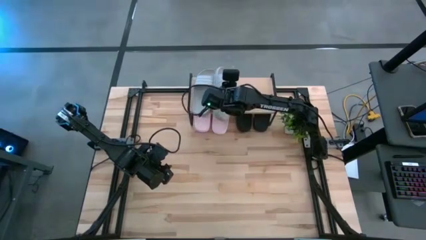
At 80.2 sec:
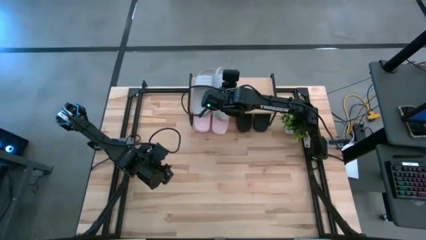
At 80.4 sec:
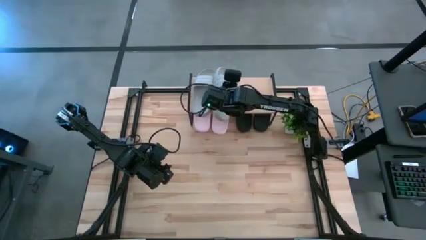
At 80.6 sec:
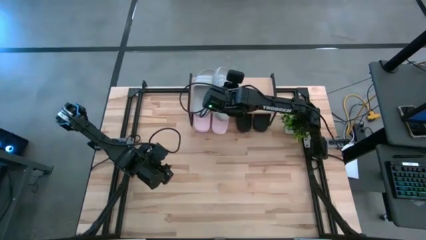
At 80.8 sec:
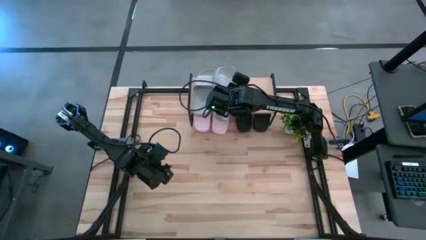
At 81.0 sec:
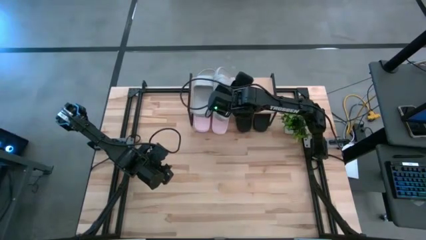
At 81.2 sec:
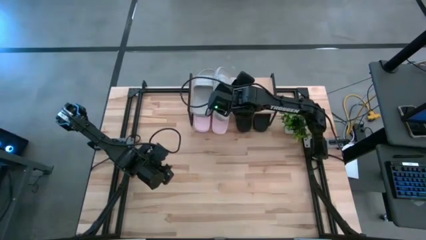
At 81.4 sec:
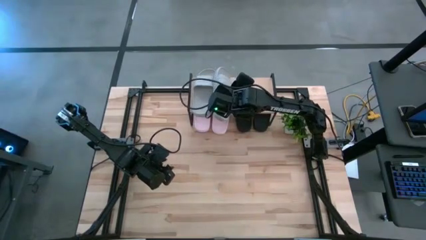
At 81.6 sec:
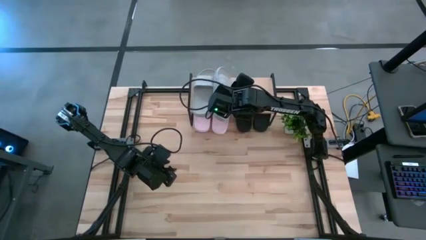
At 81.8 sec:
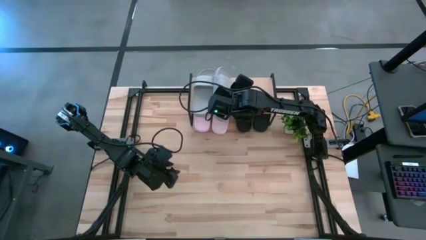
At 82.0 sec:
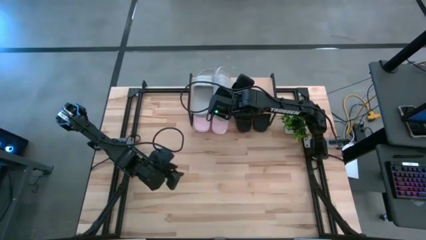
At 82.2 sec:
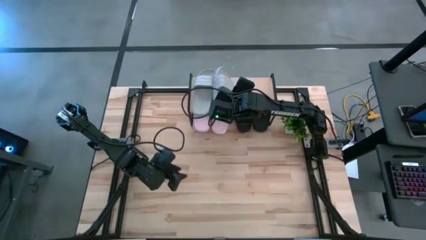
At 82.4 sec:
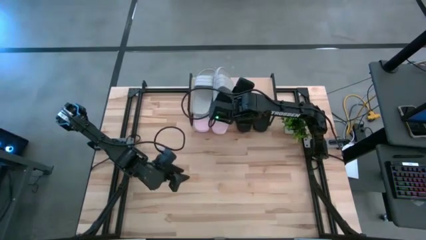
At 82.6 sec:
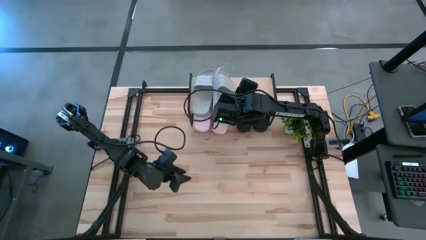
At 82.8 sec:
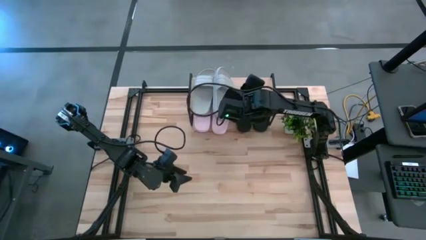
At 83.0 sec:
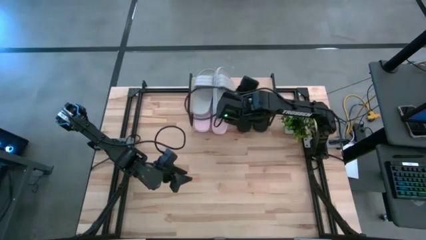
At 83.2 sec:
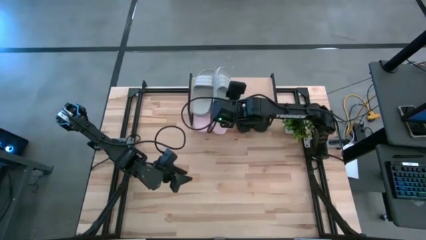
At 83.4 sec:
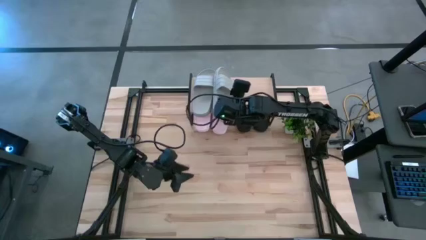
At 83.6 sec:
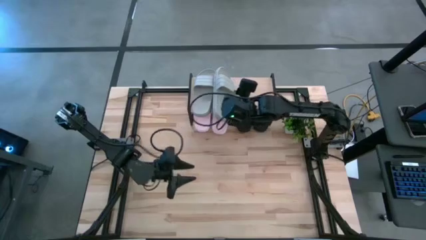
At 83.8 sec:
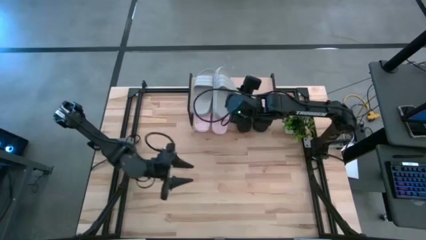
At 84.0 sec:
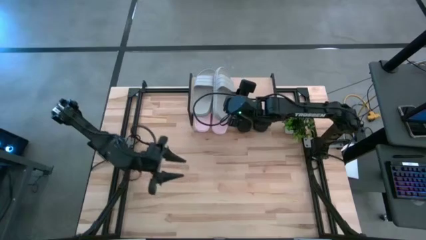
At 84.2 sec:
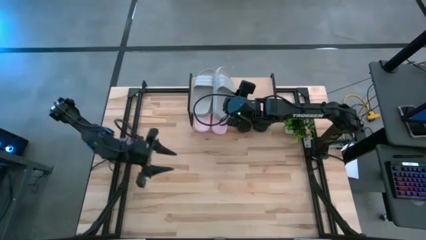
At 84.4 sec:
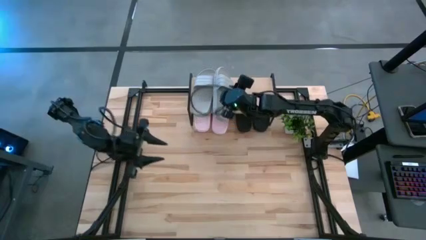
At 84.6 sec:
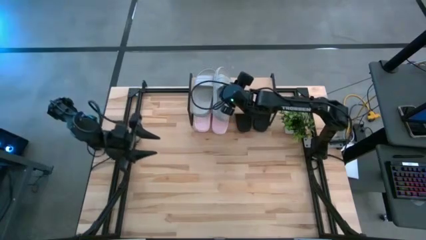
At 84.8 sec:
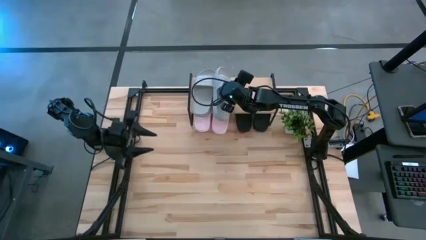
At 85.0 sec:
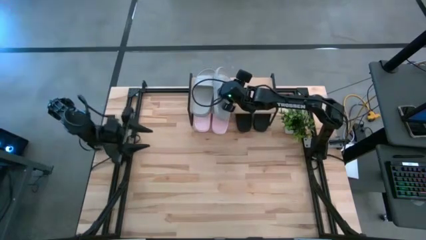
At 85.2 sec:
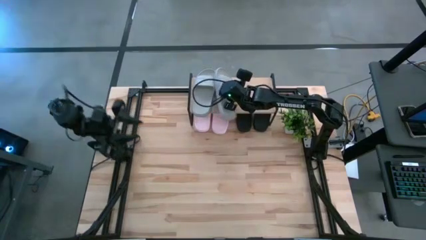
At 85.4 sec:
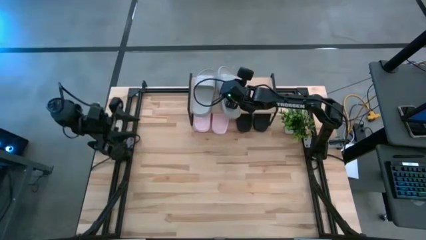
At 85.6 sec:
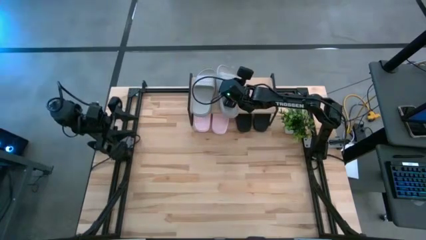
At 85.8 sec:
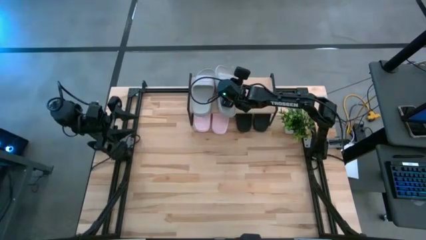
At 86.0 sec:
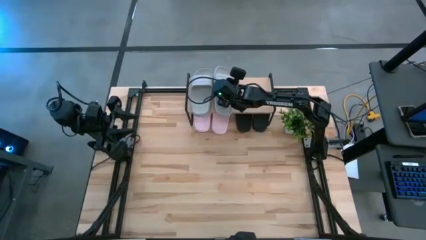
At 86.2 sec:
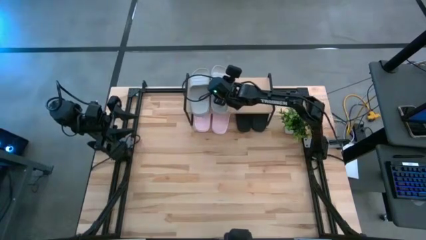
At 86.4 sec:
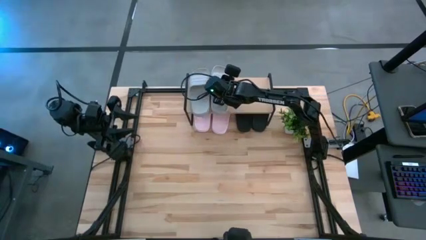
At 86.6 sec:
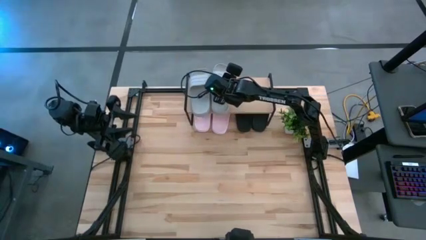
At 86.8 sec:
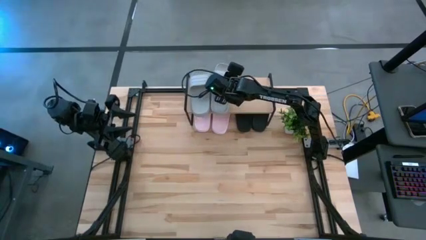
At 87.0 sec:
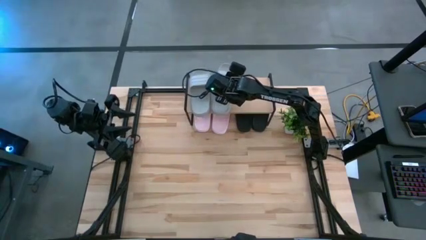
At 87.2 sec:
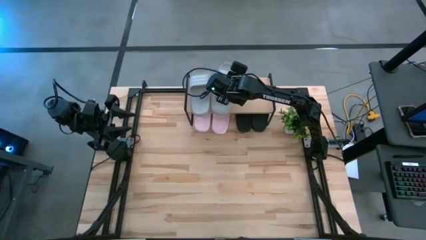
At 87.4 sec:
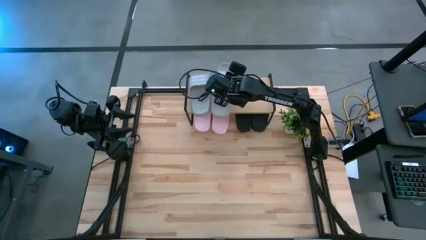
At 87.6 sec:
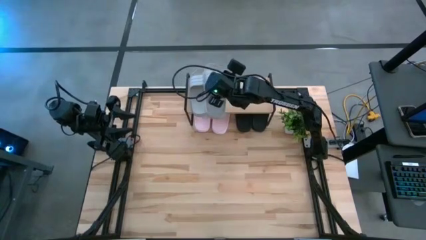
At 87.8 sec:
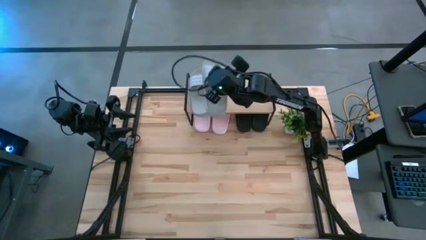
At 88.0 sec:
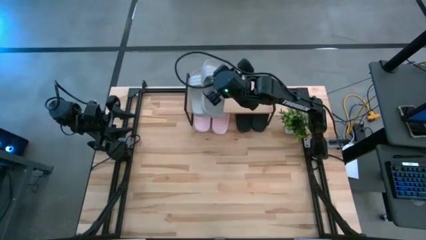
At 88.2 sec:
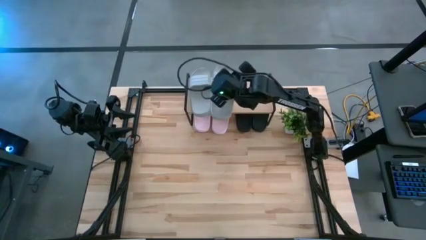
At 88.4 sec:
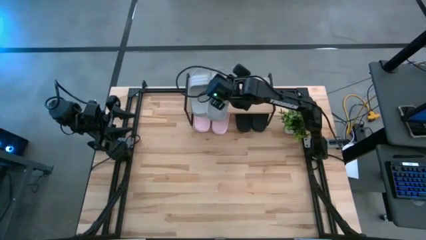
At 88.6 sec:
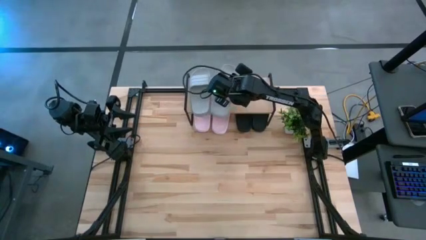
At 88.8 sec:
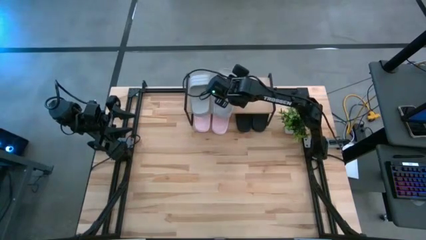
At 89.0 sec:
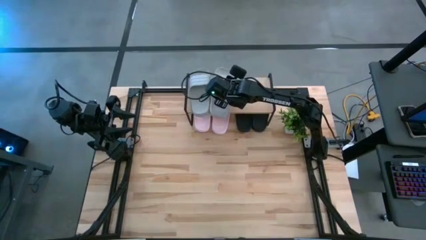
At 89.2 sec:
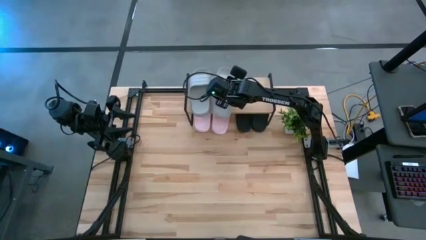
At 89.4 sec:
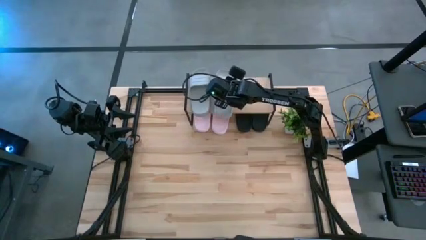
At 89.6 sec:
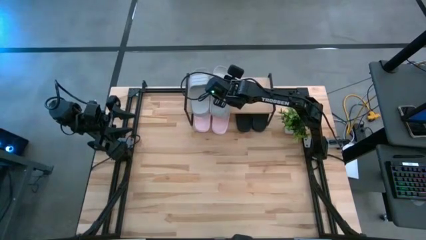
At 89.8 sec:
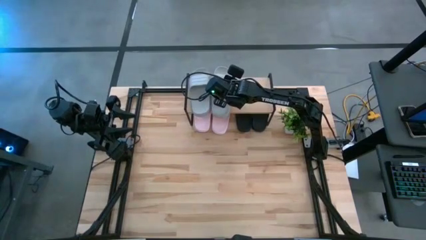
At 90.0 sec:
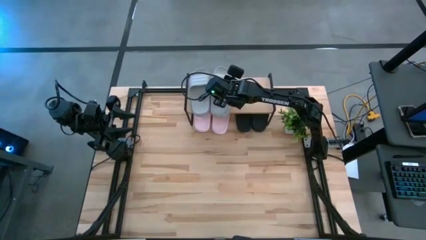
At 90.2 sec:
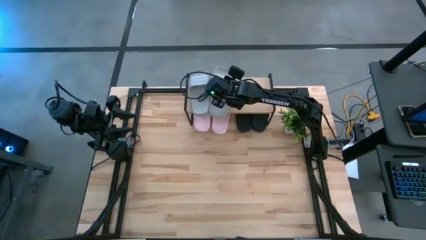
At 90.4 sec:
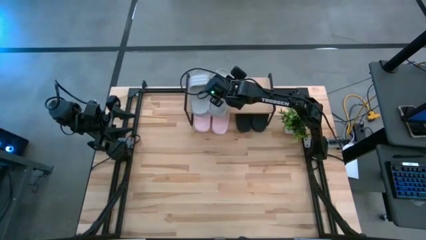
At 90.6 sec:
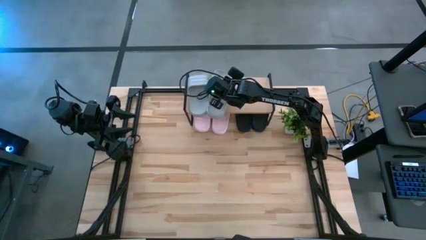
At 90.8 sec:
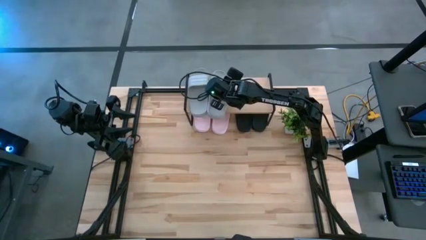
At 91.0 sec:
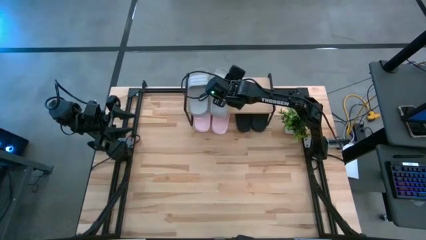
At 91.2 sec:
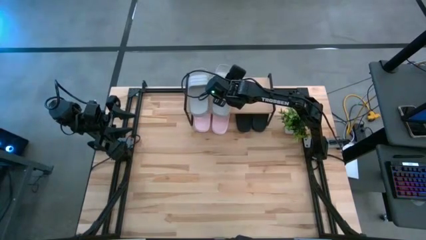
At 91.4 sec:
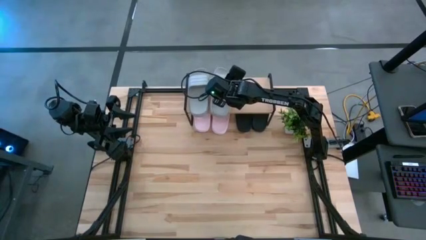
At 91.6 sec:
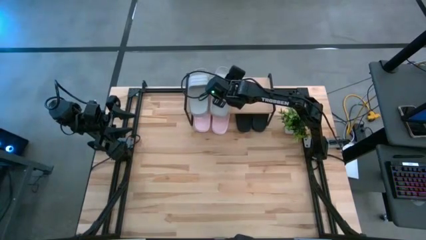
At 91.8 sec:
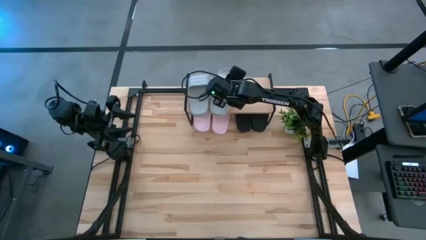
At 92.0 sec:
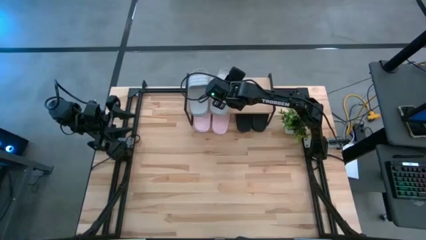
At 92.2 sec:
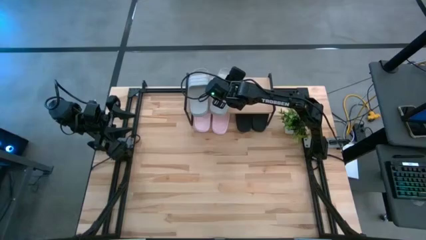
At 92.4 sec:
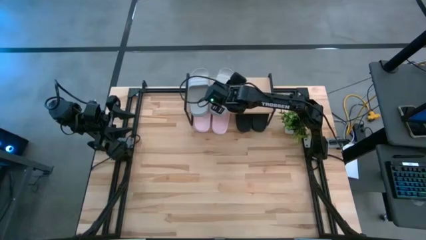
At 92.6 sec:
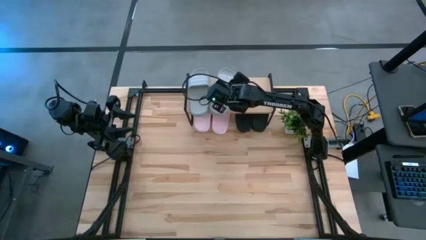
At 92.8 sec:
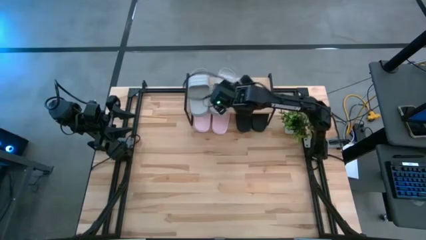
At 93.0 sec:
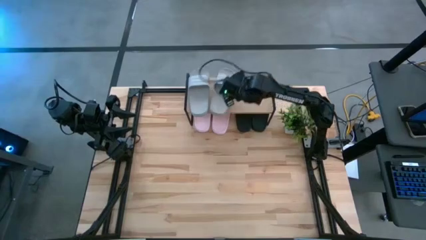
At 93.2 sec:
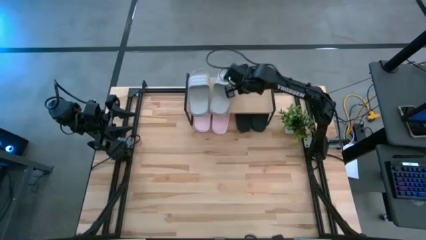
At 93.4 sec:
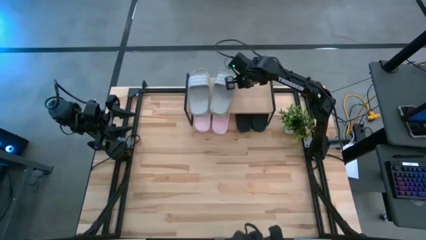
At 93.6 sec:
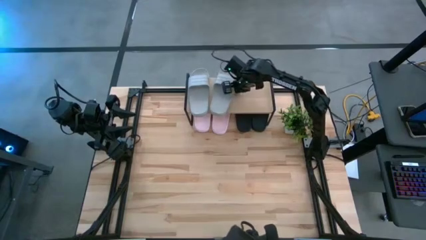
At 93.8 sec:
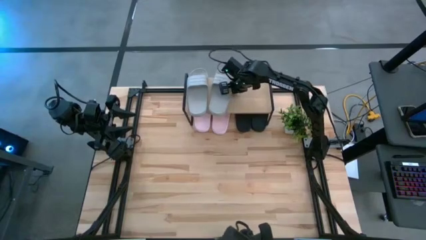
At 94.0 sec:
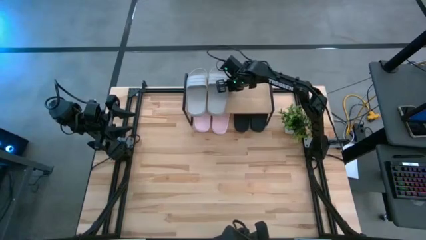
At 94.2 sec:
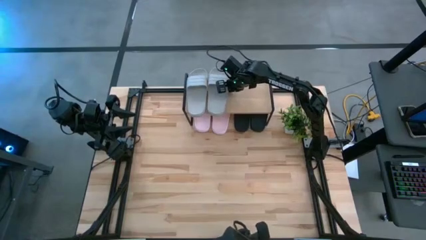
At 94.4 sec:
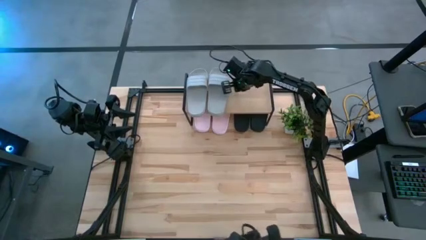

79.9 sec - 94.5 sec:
Task: Pick and place slides into the shelf
Put the right gray slide on the shelf
